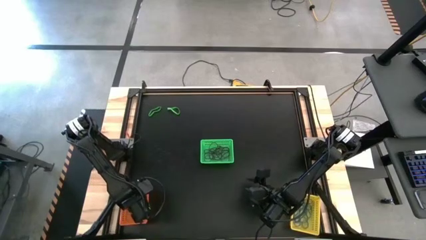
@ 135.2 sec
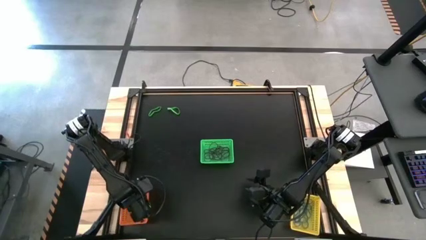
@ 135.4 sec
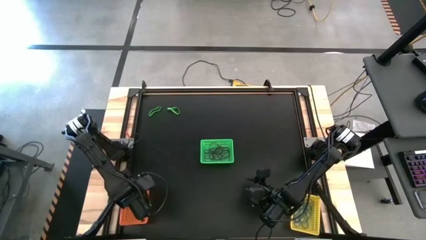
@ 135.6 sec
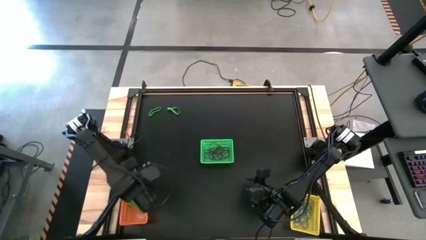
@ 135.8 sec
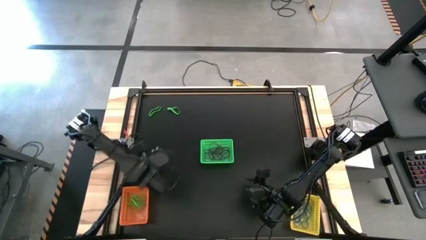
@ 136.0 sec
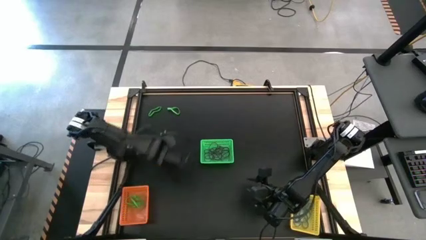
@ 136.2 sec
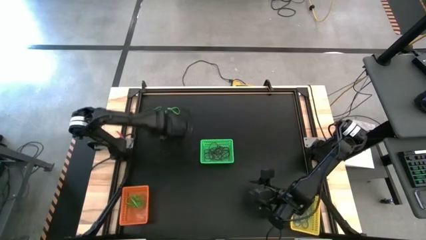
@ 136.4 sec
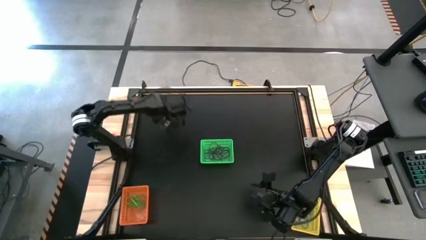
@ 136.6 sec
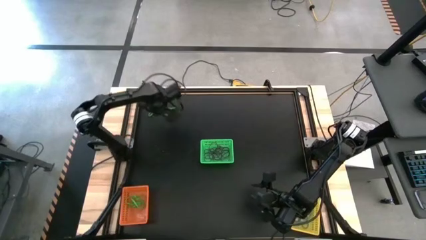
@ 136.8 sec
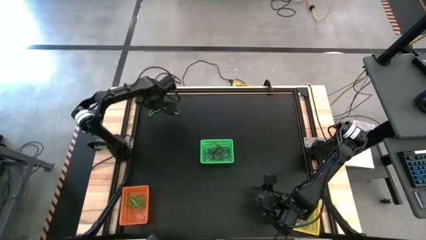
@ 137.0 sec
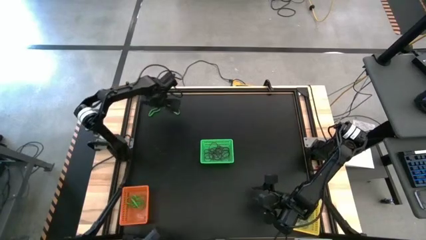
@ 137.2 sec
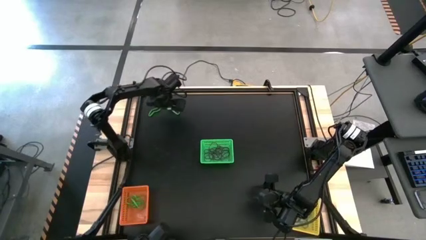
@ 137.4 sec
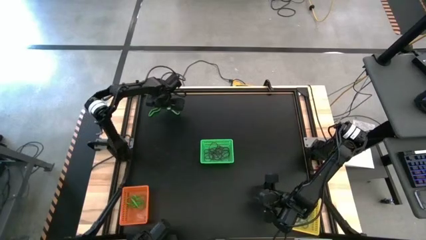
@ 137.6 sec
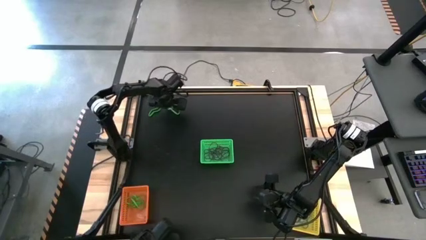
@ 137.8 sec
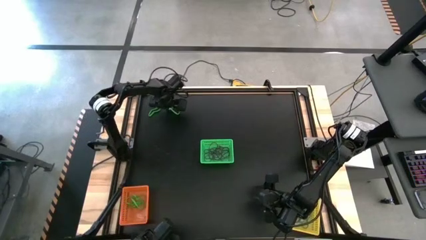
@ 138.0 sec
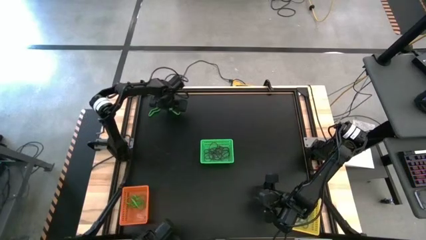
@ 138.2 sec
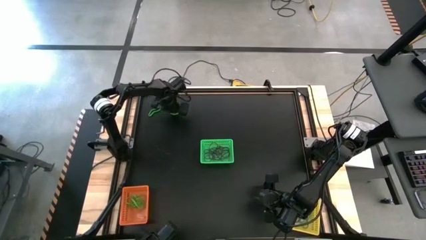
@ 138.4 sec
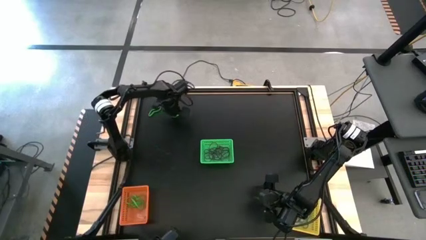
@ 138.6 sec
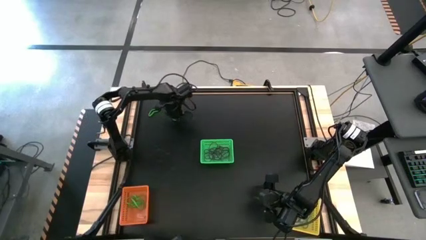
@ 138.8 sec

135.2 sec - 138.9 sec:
Task: Sort rubber bands into baskets
Put the green rubber band into the orange basket

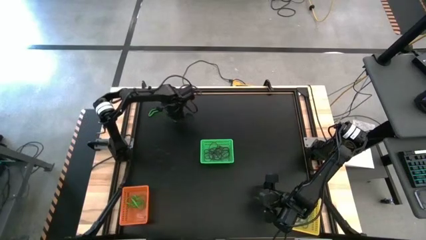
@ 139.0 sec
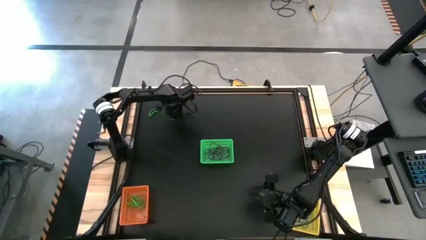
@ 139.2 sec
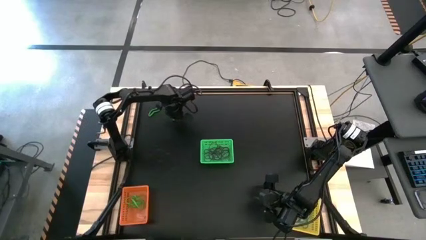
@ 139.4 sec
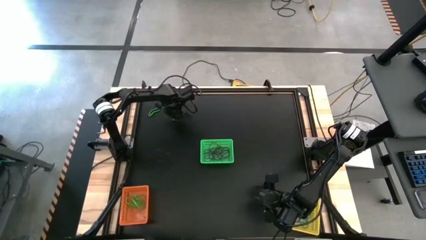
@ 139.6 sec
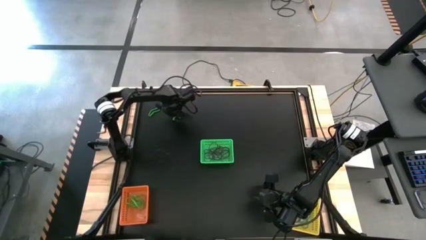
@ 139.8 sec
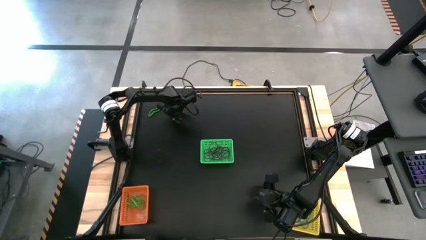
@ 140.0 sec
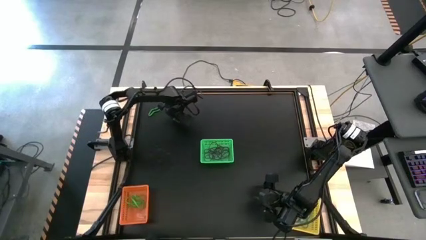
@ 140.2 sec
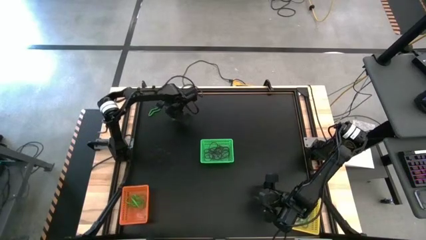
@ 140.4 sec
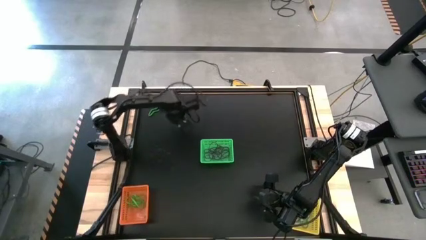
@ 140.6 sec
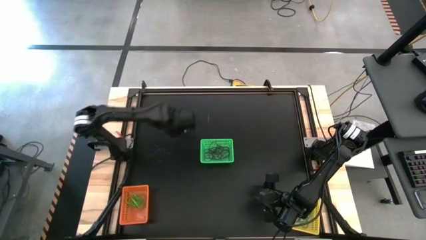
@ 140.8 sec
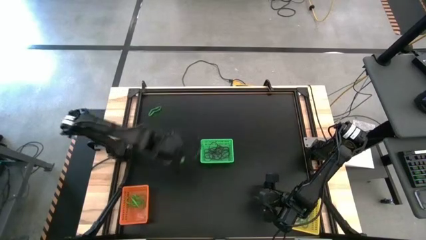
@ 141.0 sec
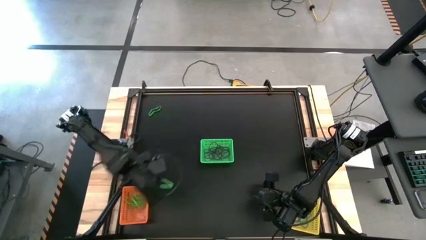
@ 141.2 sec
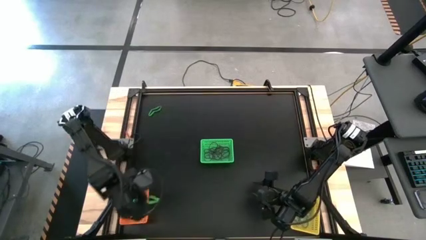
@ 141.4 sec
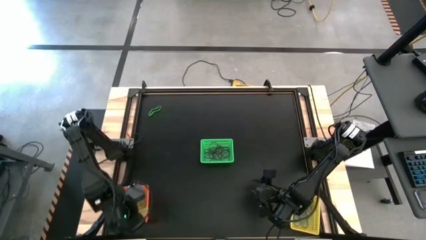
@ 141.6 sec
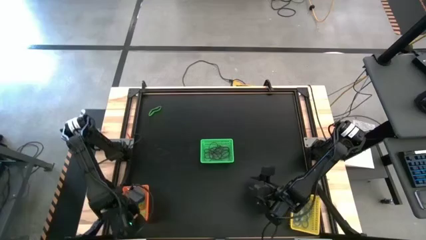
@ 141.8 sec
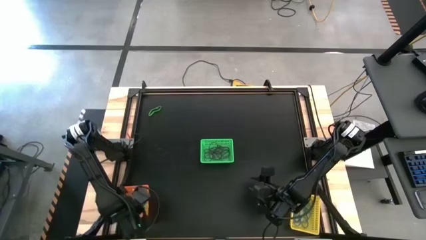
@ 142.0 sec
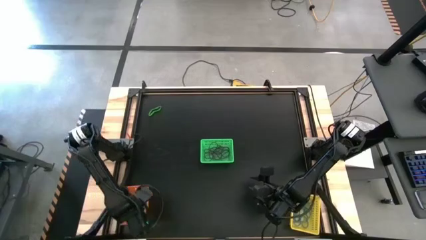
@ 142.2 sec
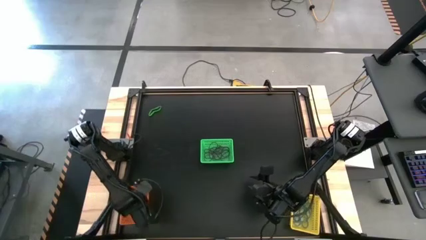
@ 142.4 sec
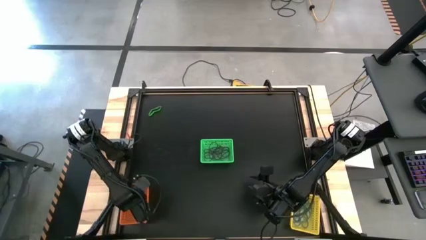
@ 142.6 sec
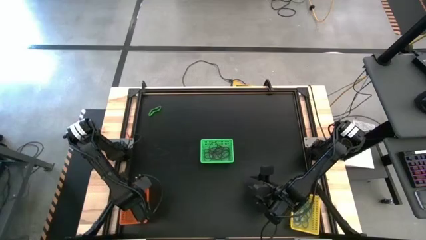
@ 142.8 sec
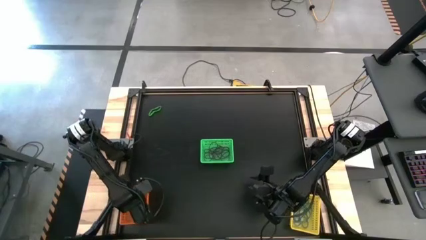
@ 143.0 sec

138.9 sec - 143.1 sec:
Put the green rubber band into the orange basket

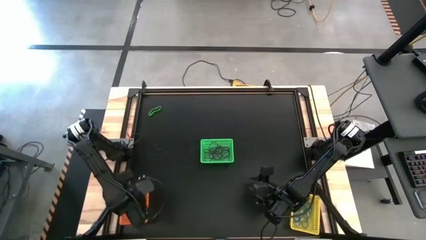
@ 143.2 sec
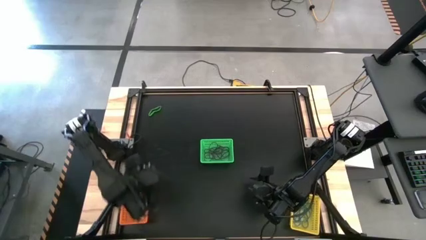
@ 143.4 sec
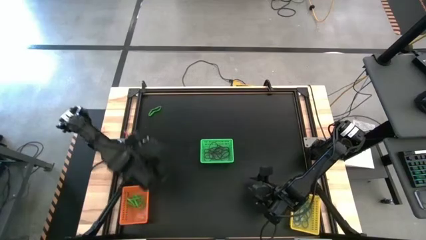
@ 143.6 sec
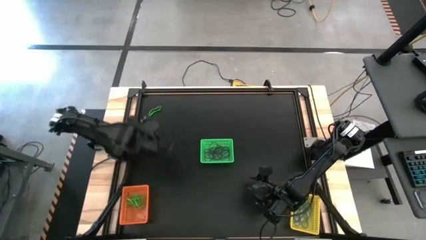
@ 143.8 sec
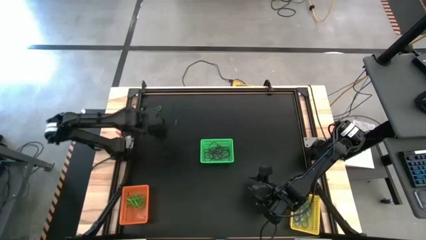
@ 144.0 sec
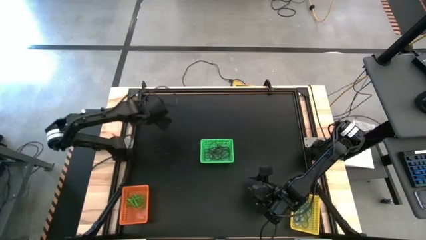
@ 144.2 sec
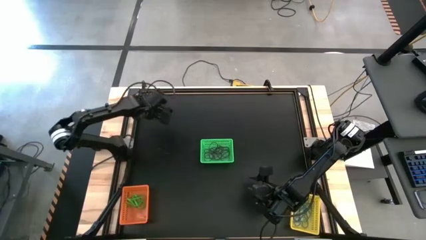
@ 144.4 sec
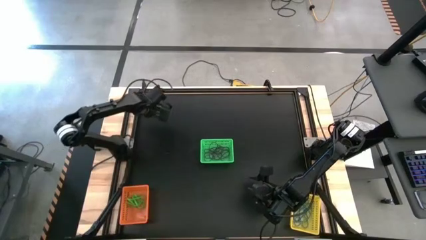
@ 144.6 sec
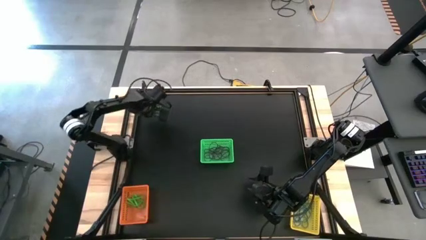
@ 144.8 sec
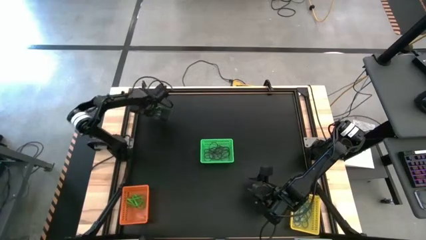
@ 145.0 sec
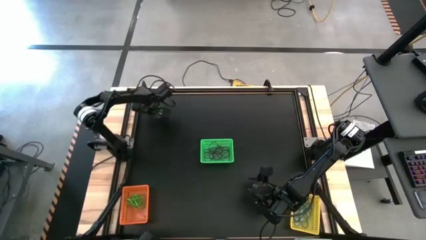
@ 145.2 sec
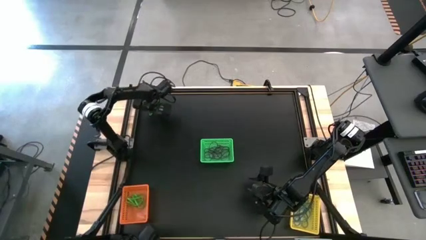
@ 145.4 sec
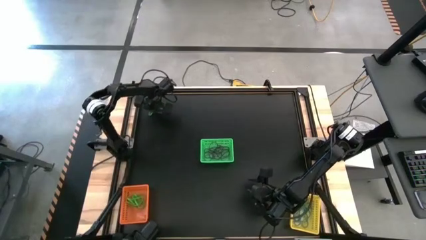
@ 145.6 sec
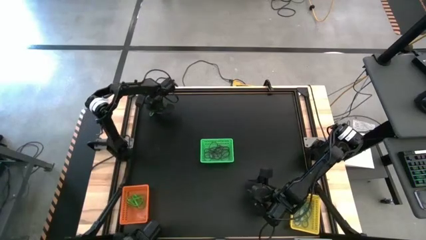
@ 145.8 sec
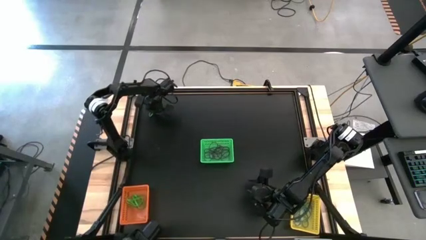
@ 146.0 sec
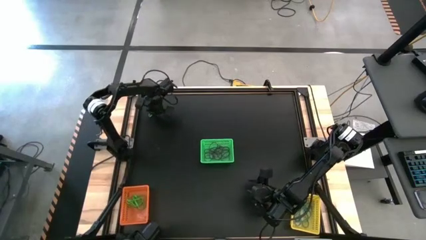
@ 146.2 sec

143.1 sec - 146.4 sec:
Put the green rubber band into the orange basket

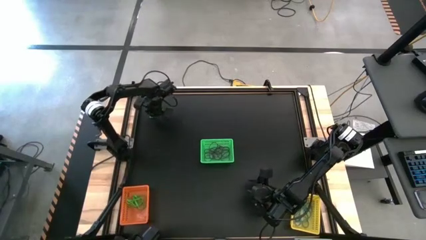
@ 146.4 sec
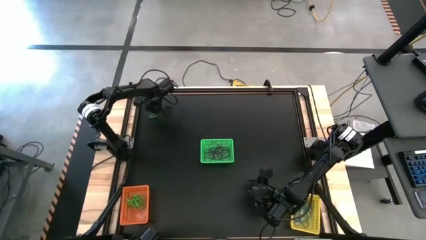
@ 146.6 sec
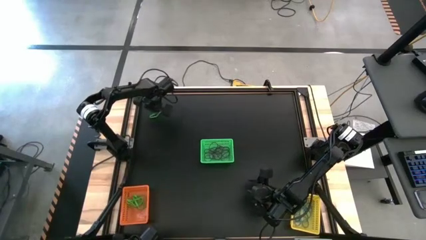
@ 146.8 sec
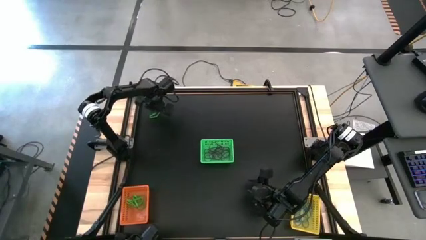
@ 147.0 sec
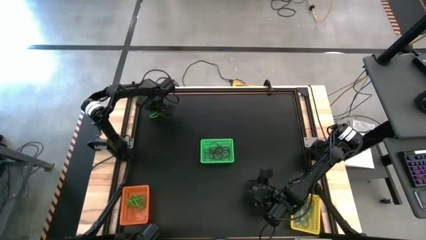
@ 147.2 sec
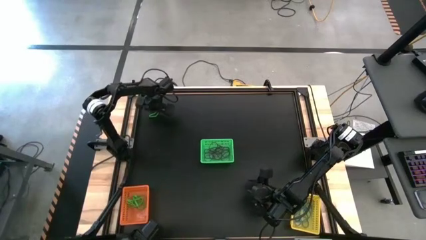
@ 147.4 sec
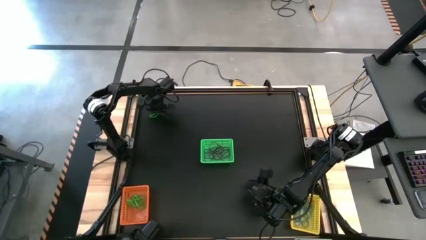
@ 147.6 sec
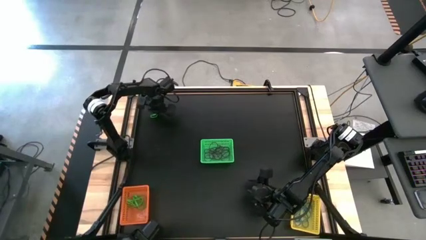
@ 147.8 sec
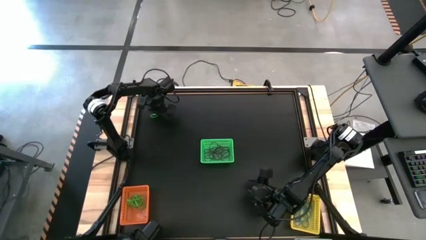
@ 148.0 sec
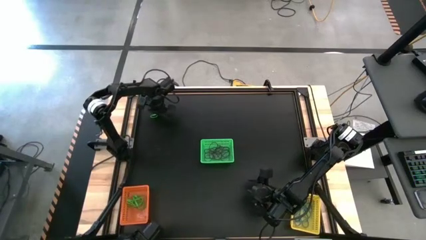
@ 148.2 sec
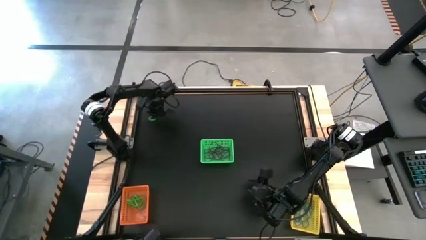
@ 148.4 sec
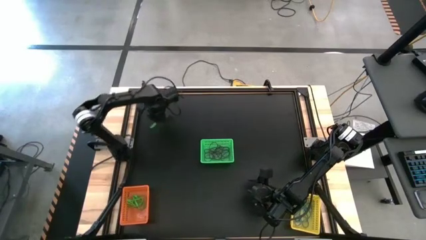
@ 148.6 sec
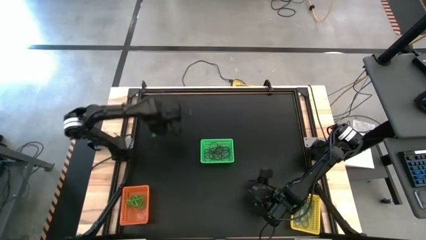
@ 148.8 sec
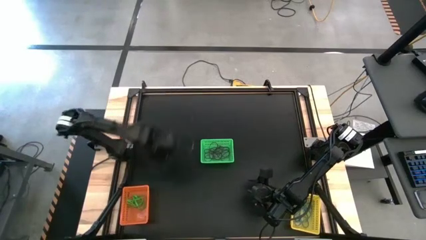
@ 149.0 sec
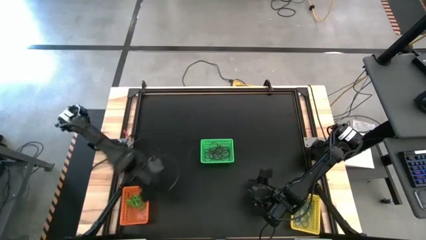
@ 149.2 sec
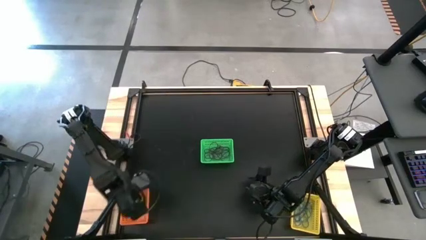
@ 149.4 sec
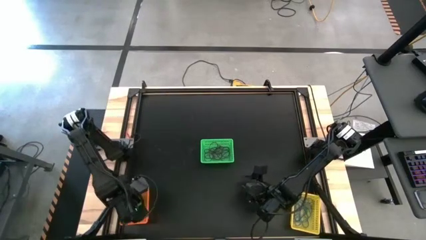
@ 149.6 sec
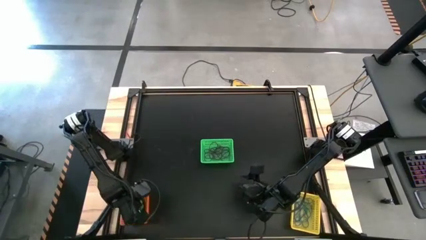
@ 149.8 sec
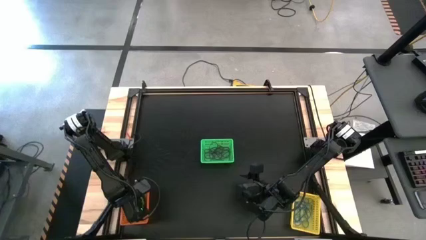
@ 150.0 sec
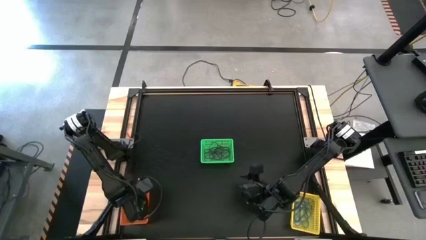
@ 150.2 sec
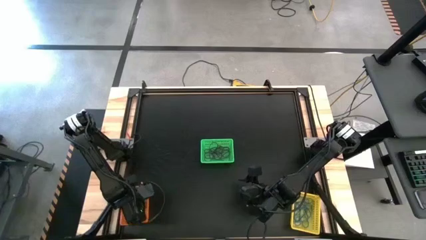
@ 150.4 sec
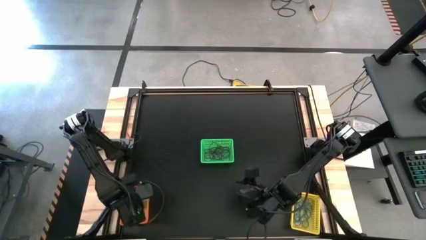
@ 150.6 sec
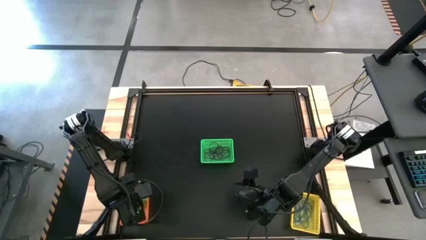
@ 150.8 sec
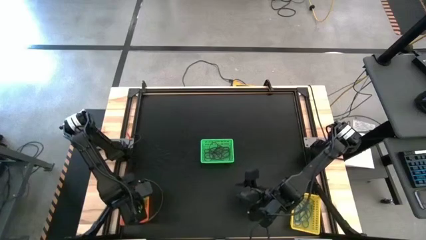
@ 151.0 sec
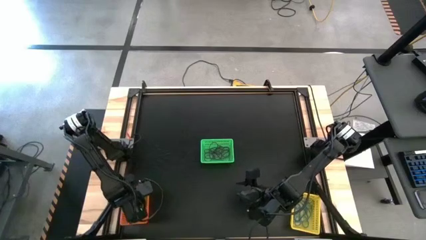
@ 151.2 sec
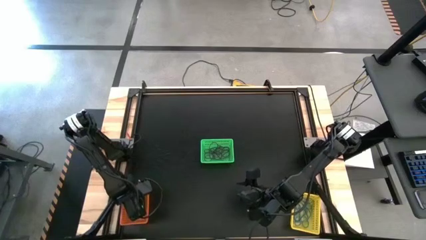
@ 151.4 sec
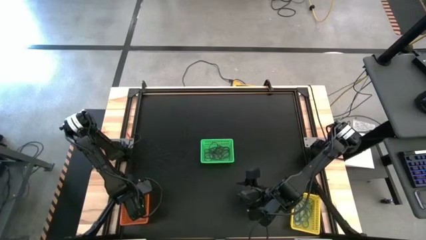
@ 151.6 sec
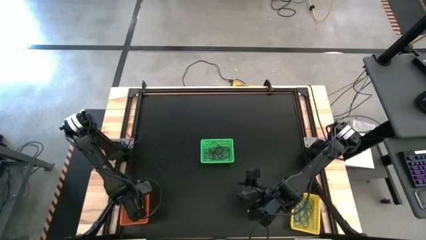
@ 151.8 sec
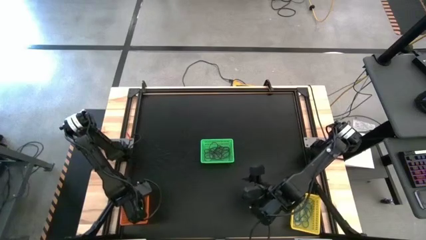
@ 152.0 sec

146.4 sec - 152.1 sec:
Put the green rubber band into the orange basket
